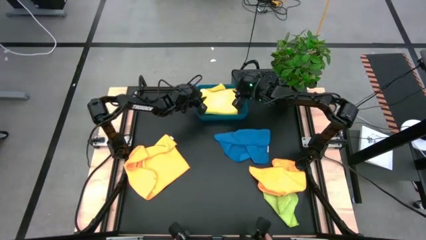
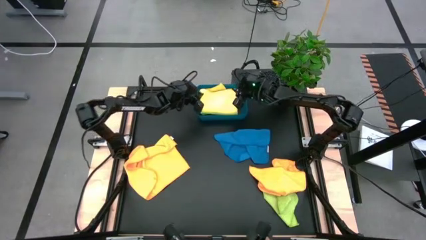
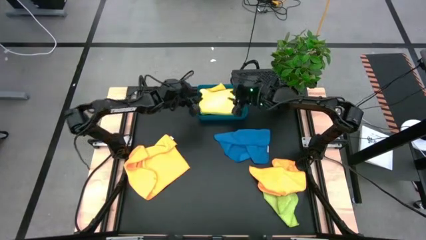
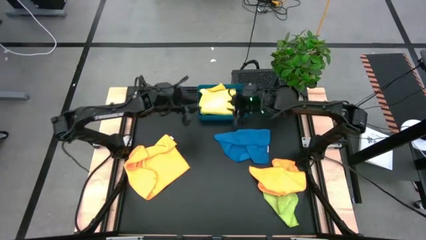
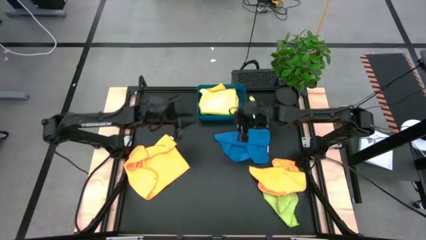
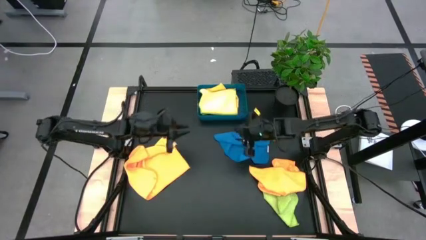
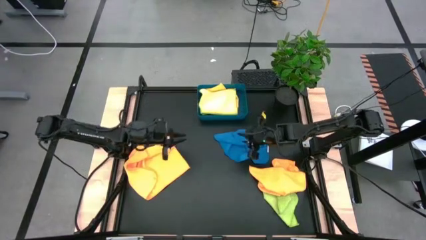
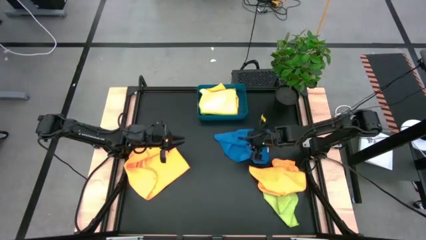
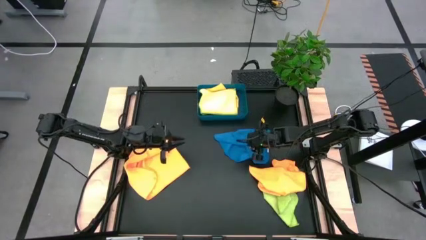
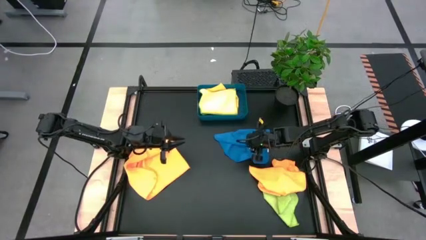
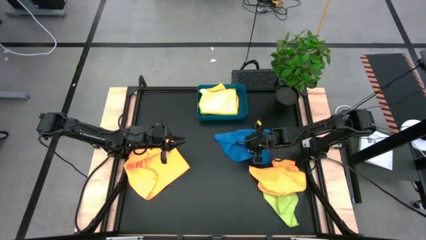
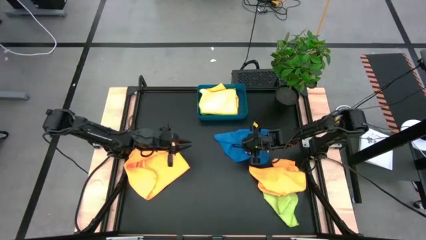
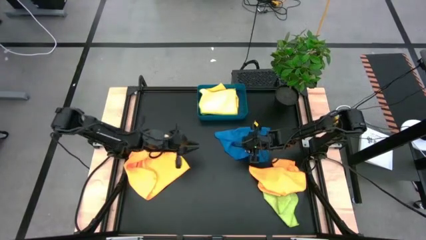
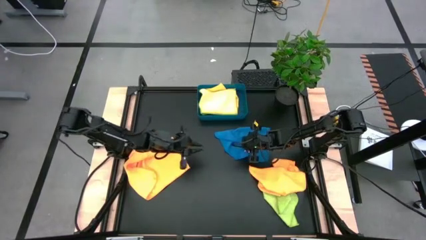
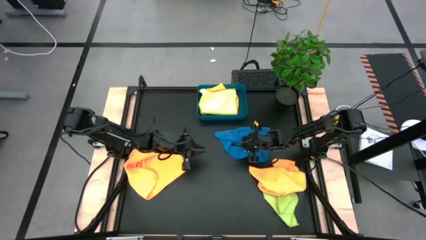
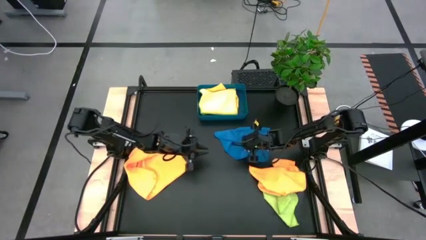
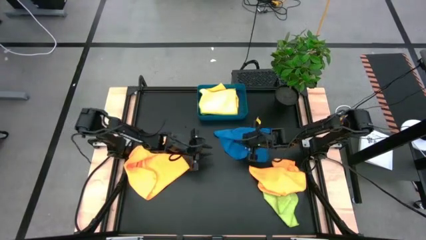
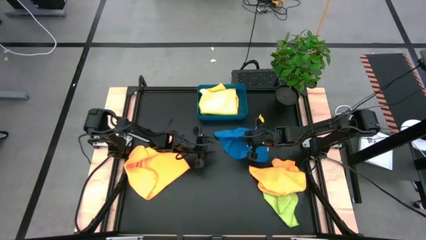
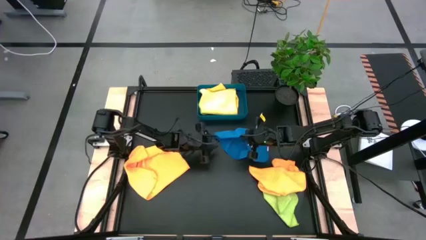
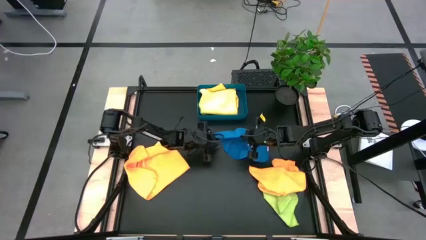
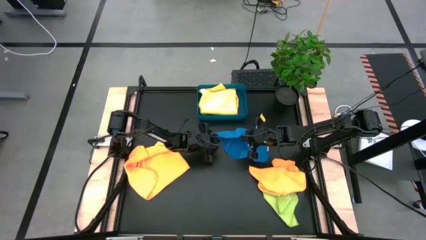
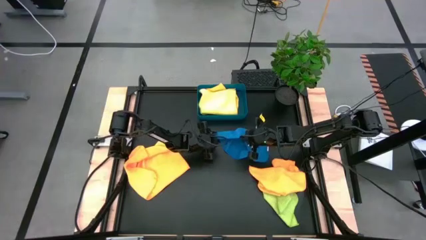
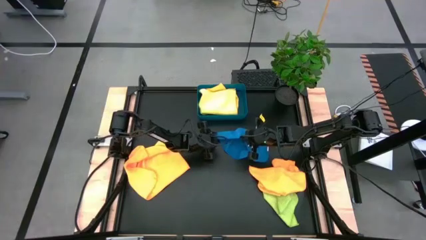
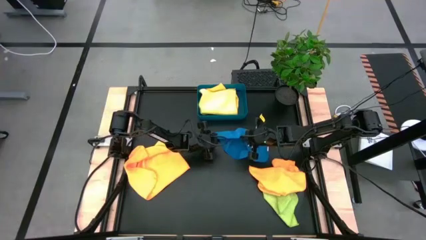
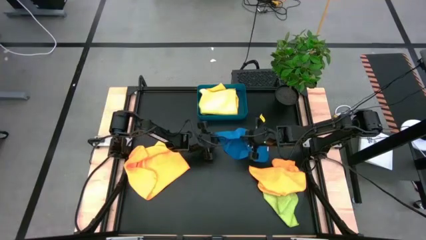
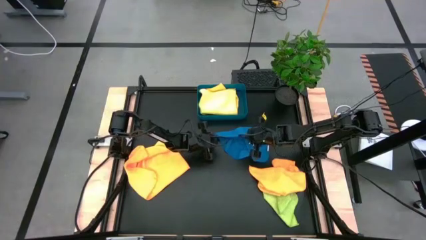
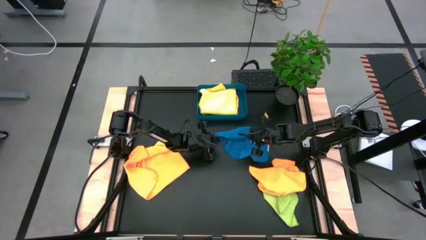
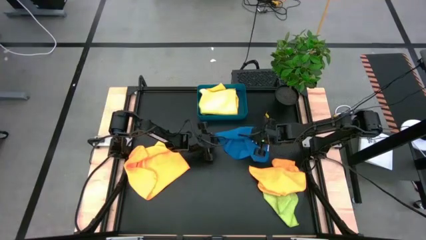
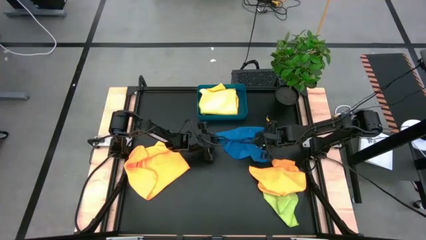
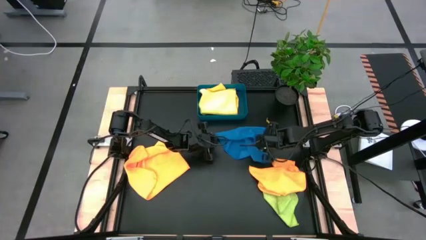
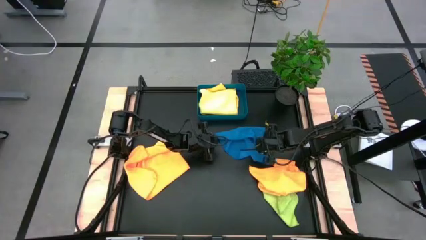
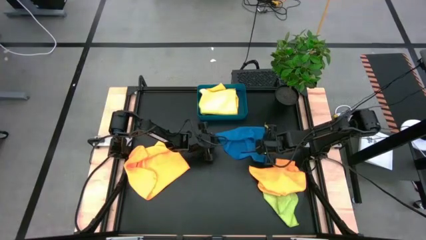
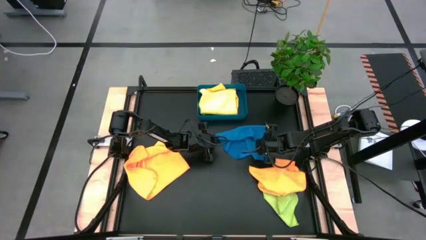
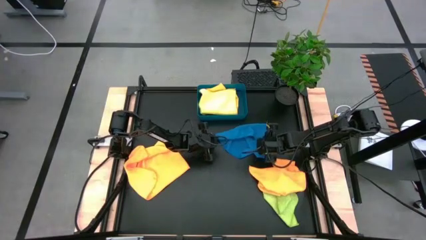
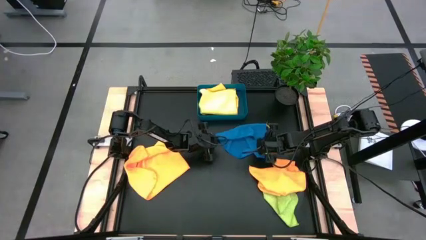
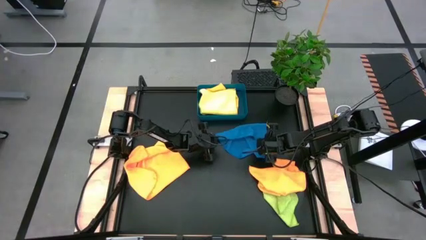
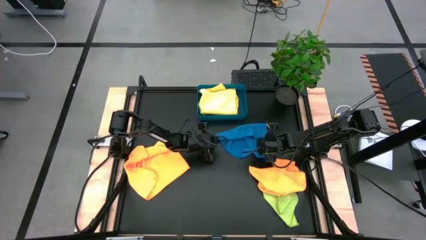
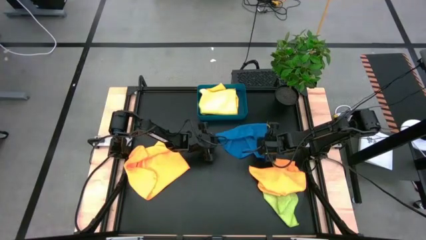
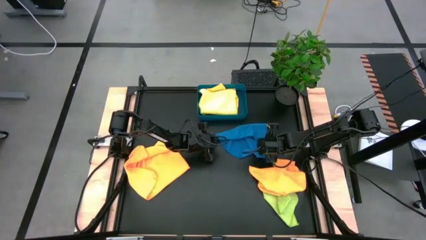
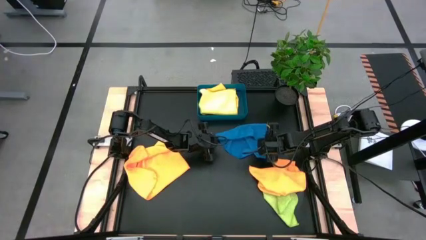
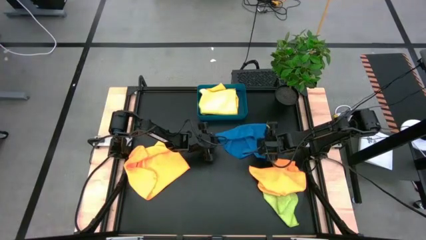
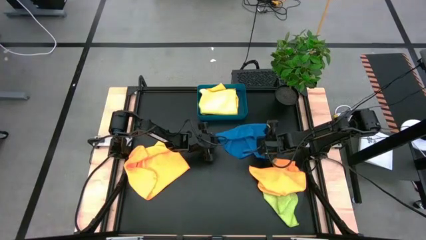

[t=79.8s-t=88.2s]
Task: Fold microfiber towels
Fold the blue microfiber towel

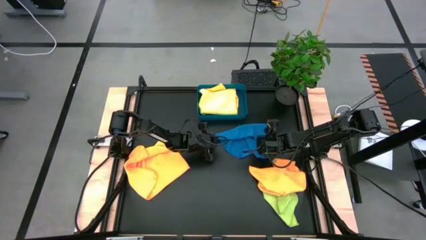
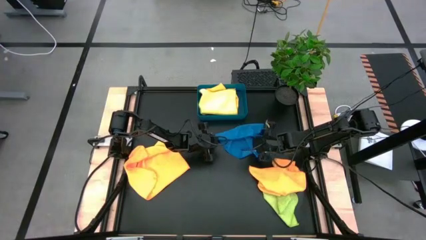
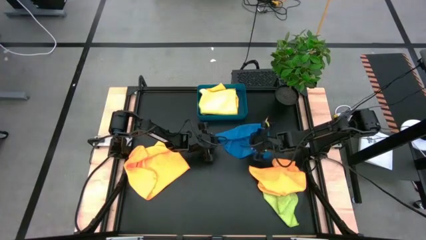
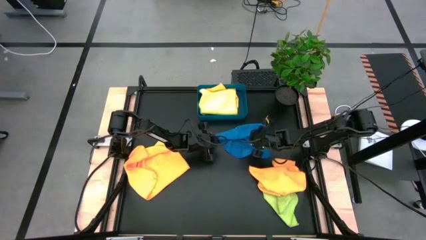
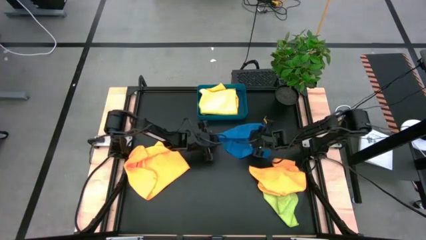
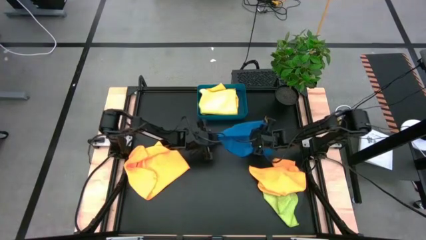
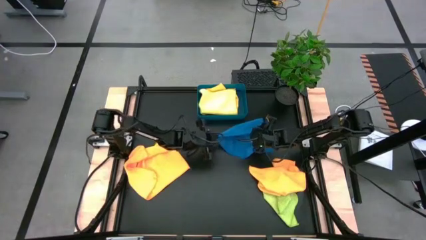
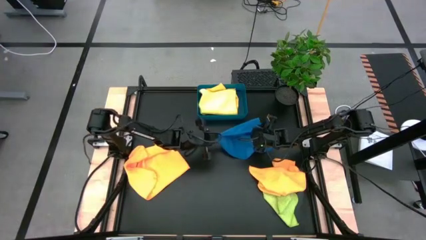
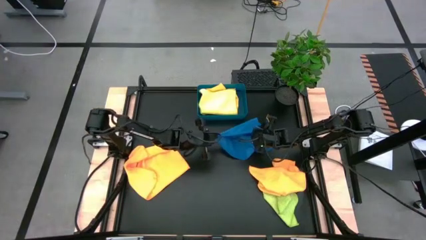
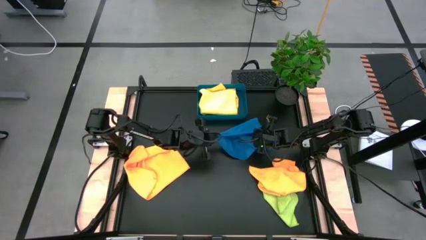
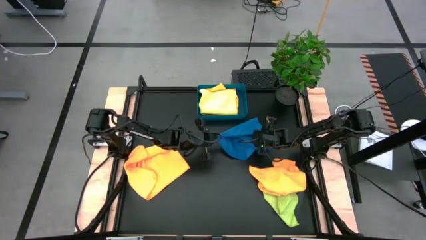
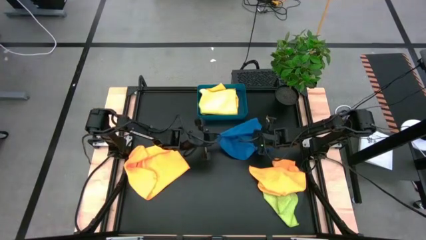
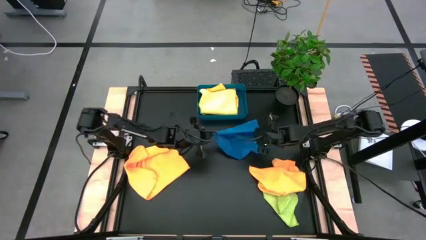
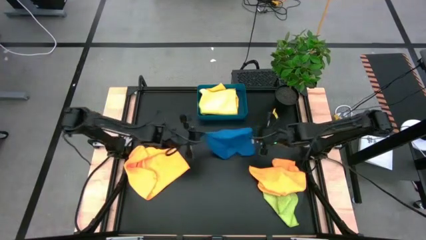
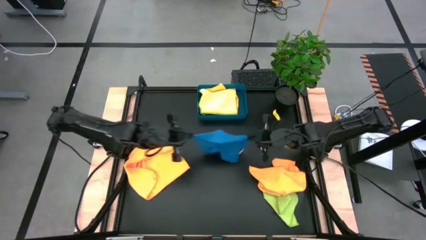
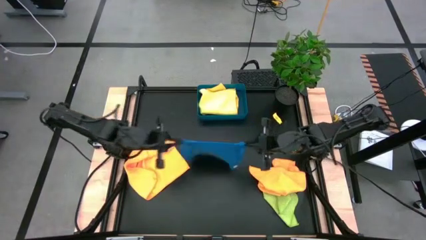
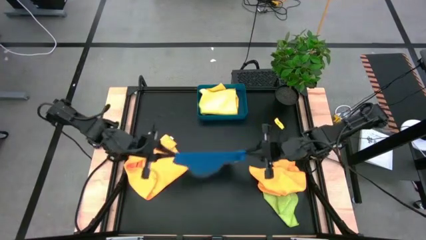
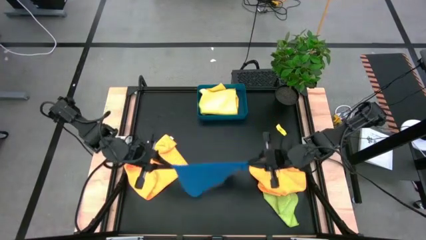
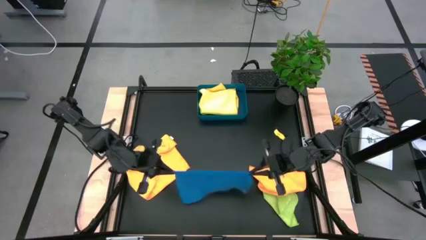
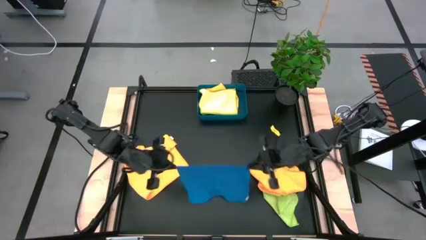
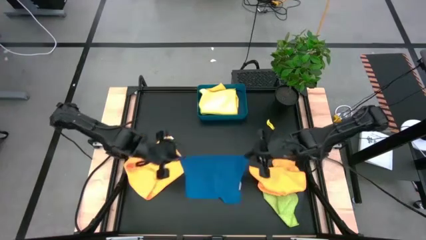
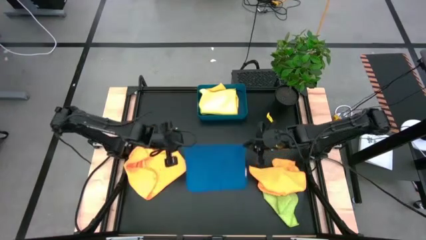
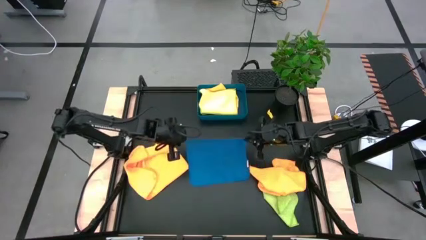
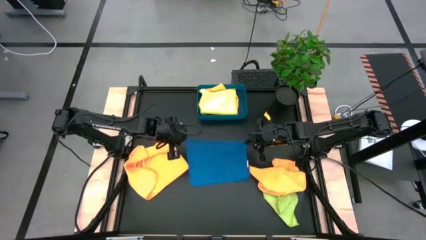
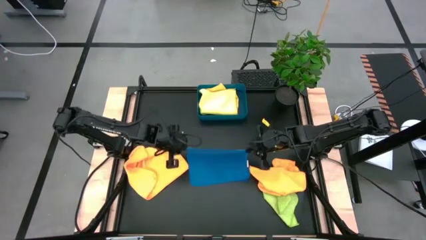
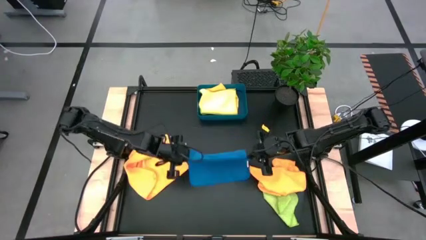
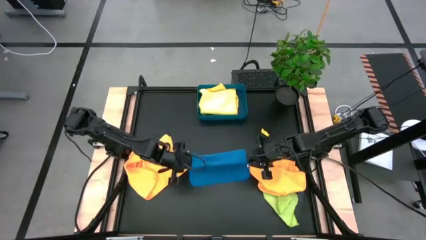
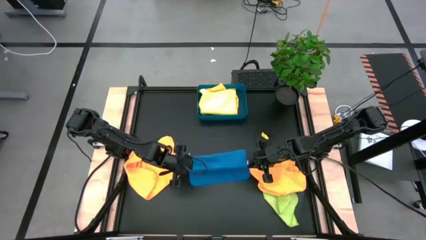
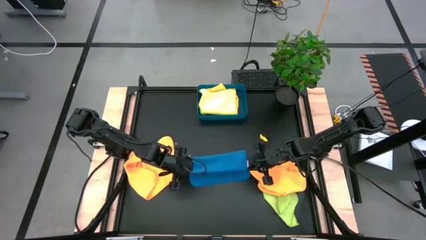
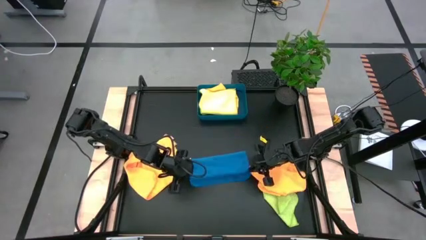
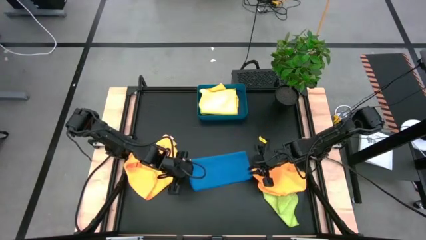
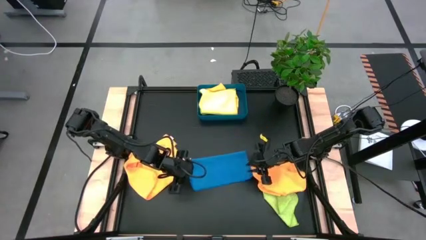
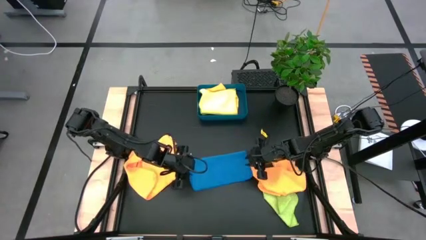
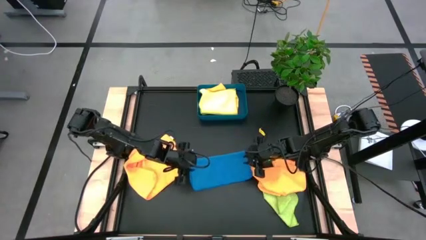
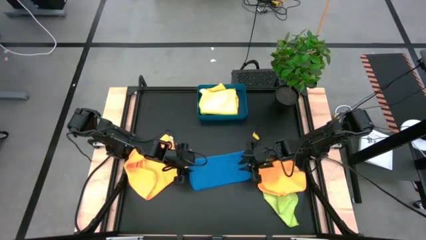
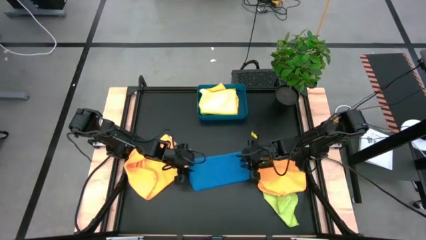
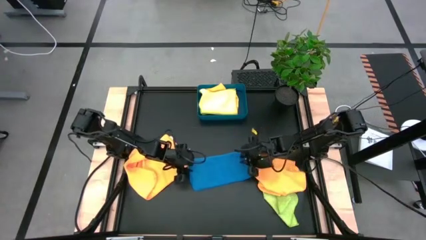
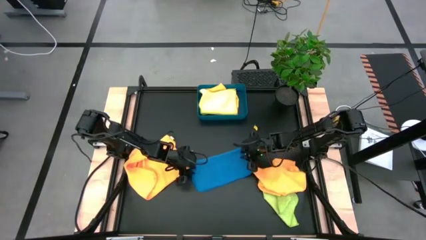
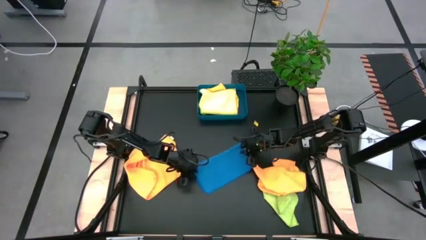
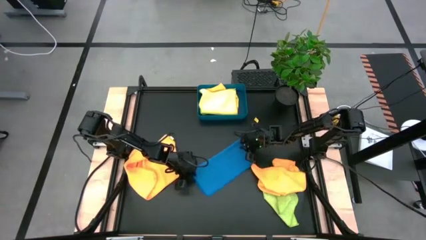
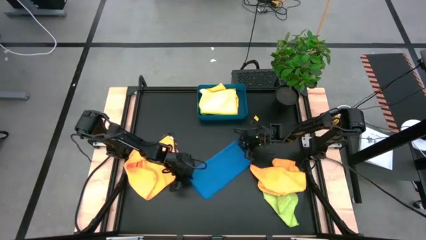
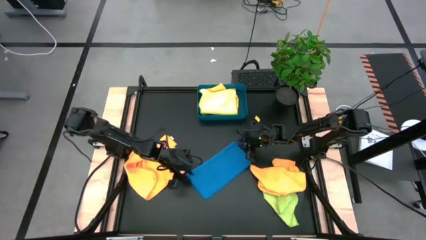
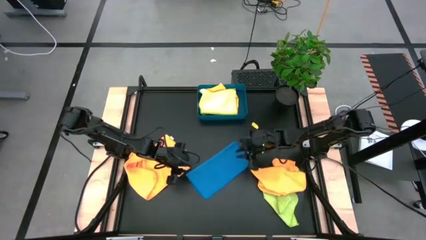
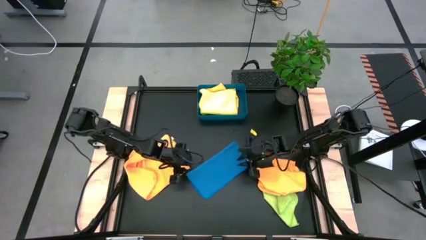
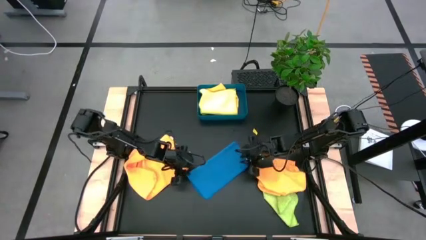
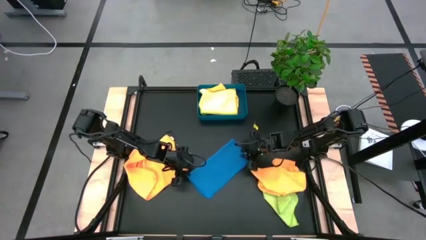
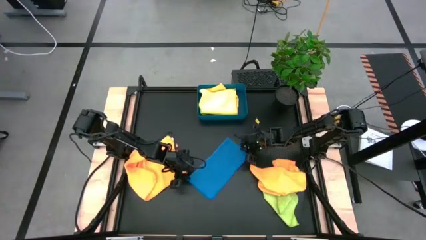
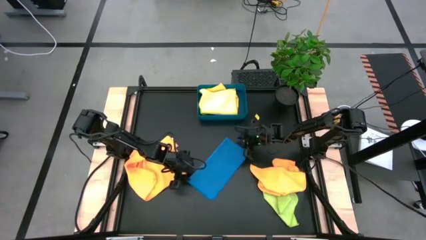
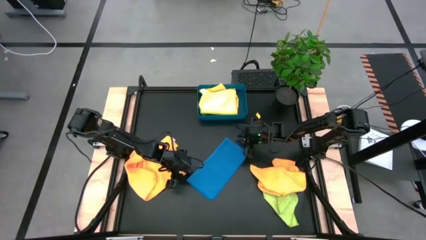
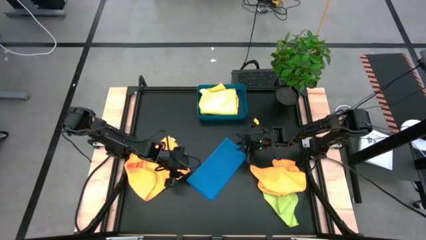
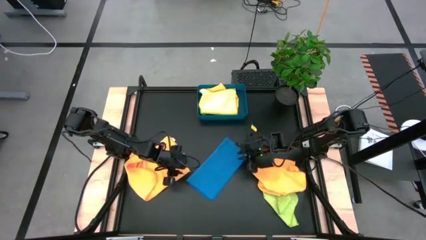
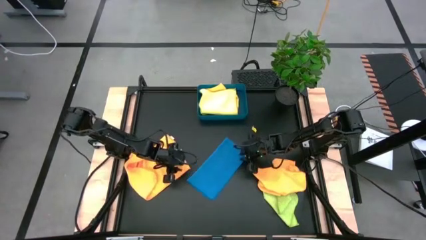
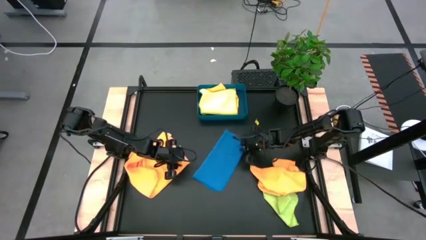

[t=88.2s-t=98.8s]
Fold the blue microfiber towel
